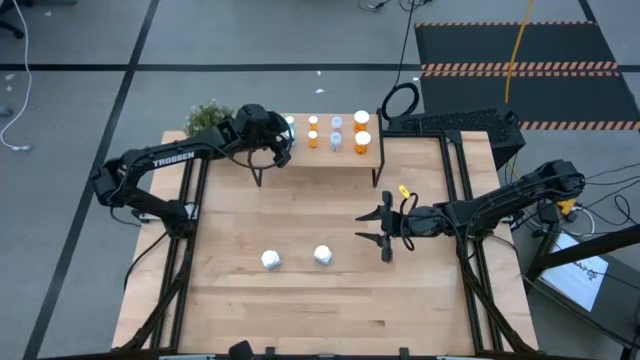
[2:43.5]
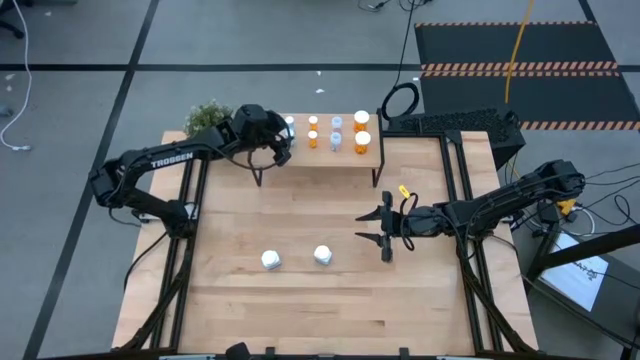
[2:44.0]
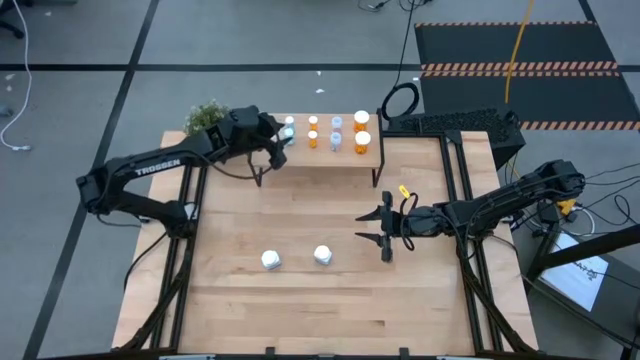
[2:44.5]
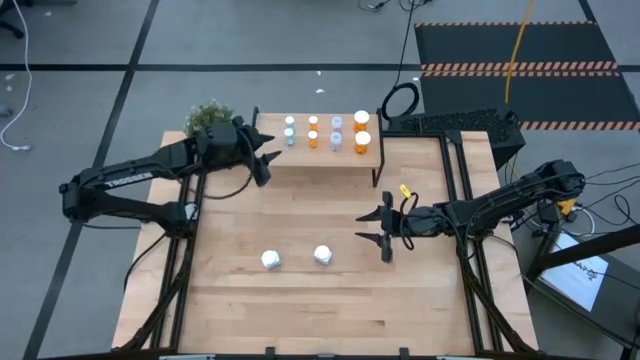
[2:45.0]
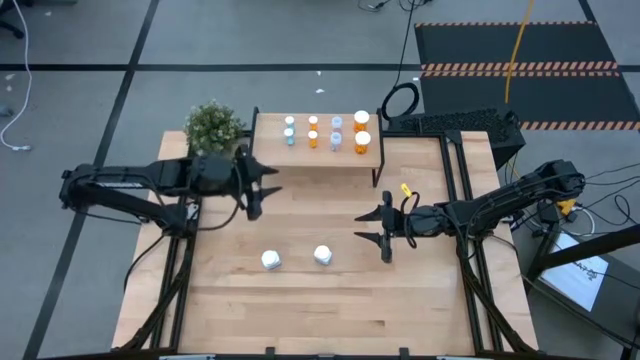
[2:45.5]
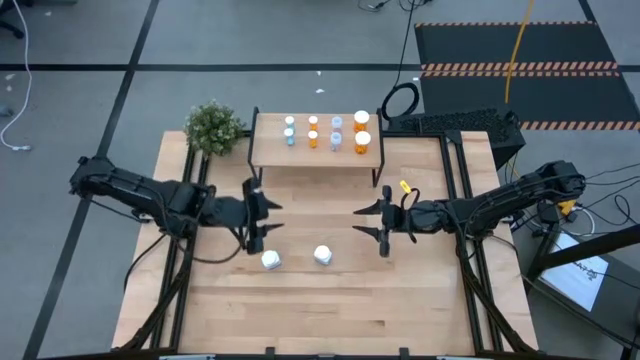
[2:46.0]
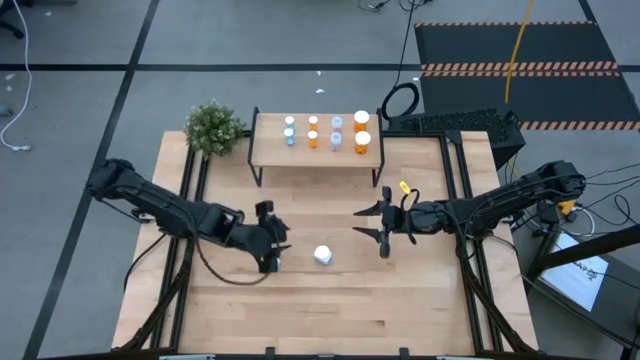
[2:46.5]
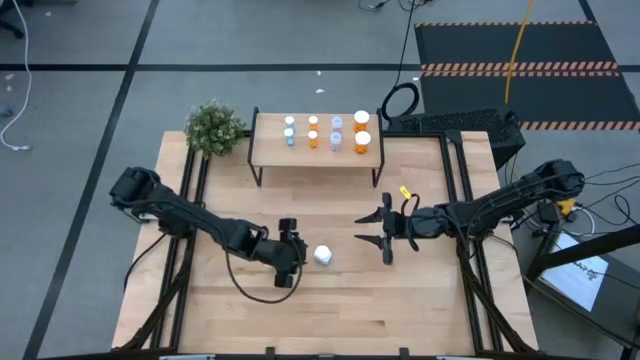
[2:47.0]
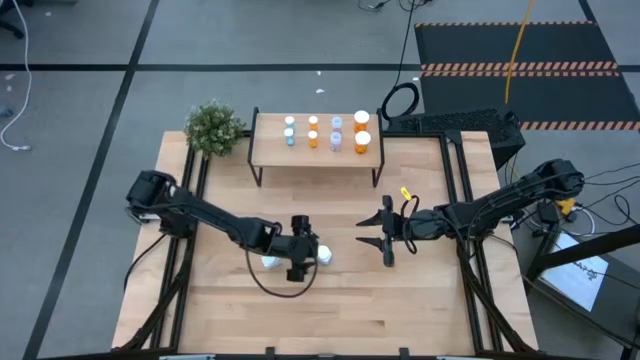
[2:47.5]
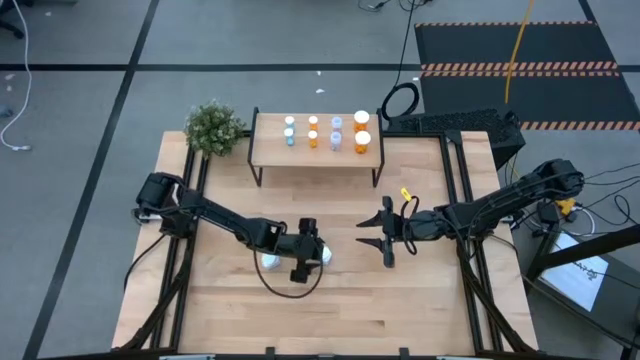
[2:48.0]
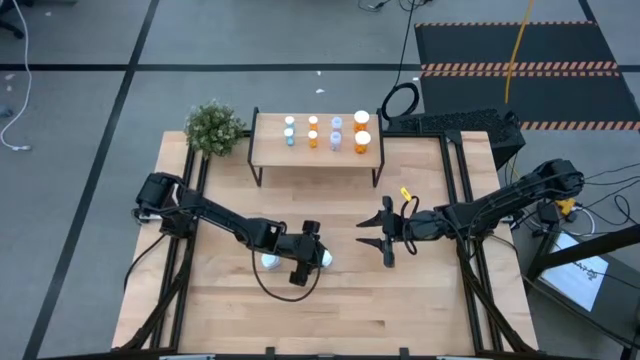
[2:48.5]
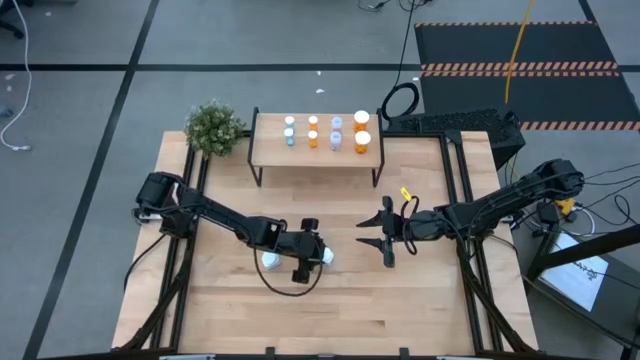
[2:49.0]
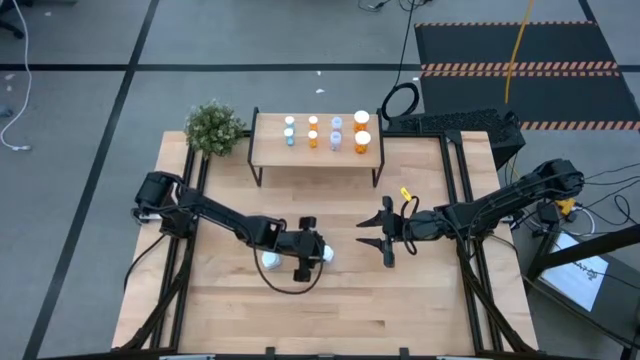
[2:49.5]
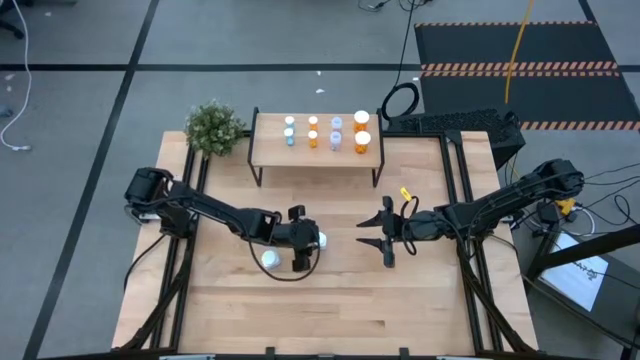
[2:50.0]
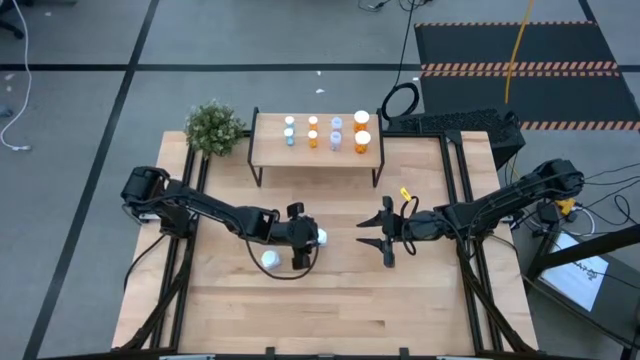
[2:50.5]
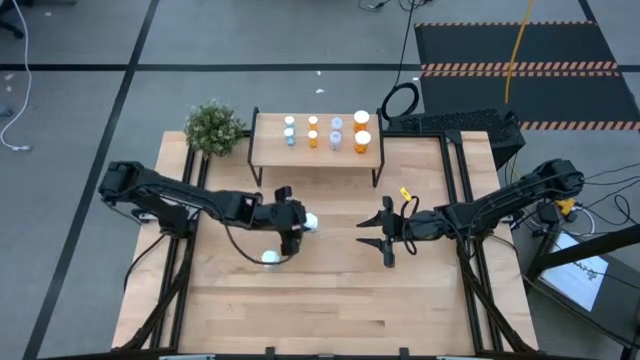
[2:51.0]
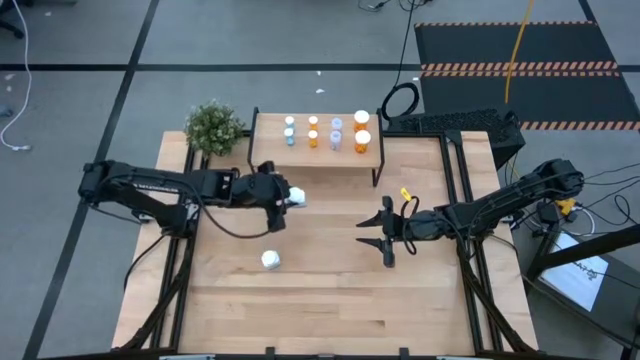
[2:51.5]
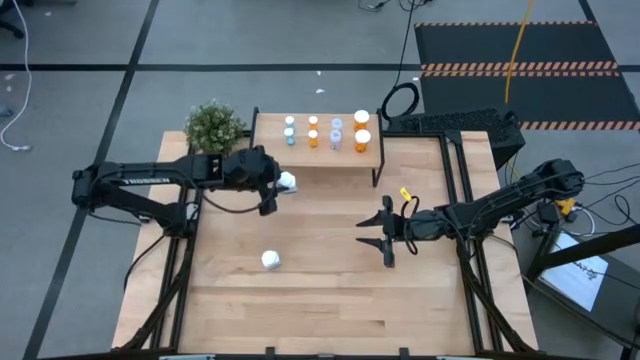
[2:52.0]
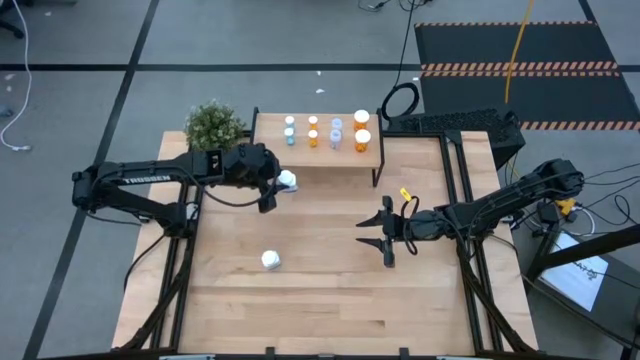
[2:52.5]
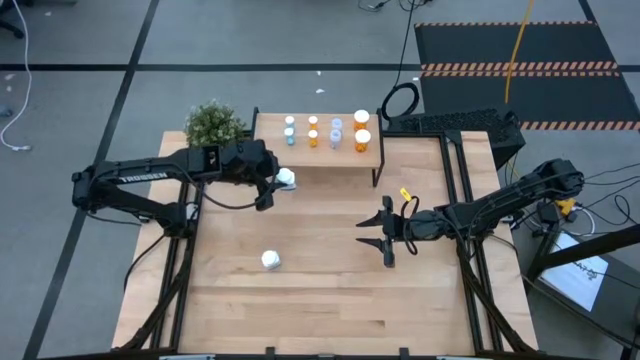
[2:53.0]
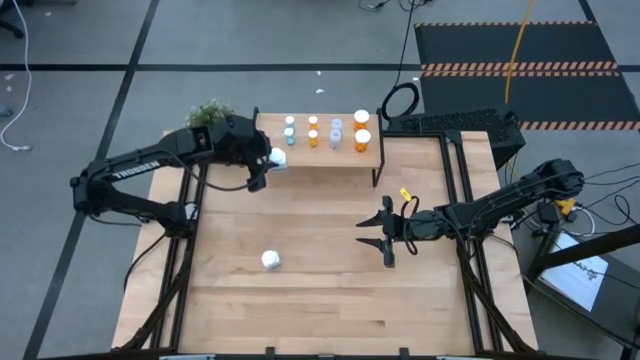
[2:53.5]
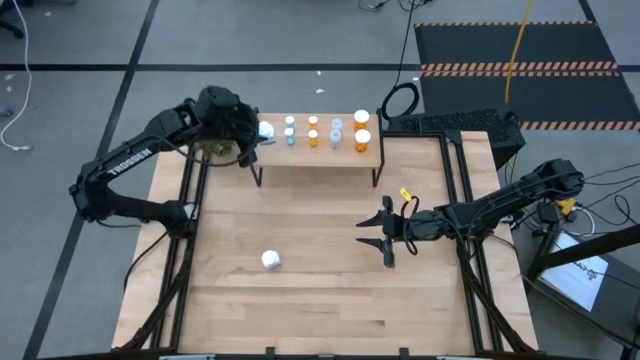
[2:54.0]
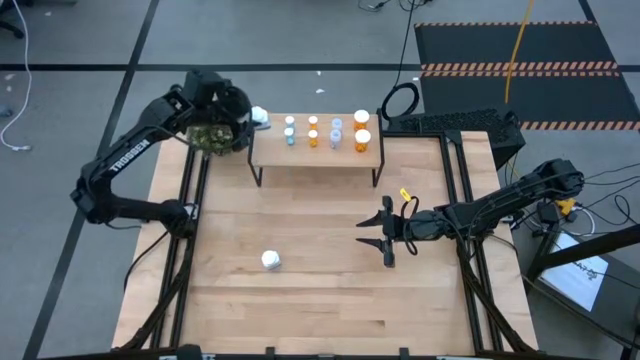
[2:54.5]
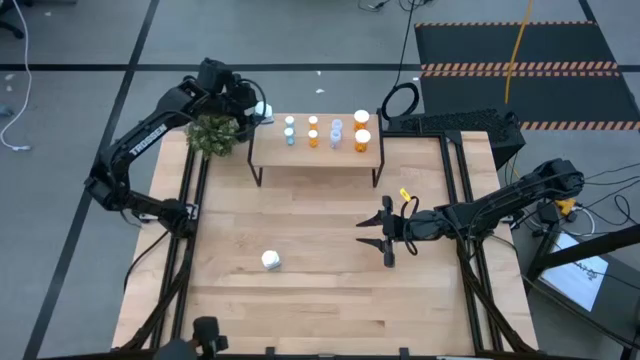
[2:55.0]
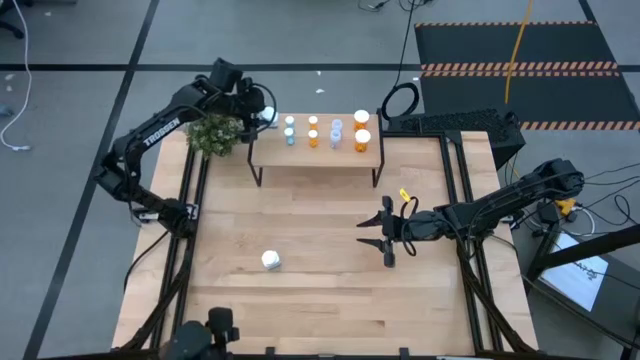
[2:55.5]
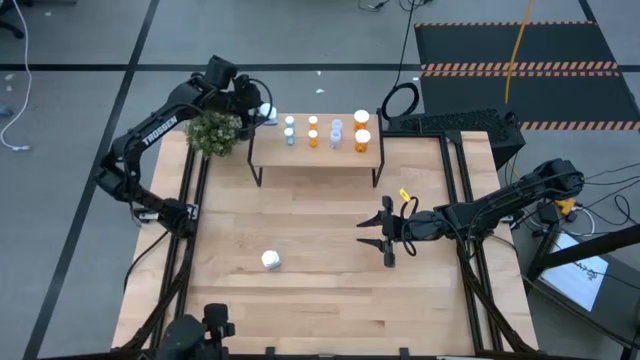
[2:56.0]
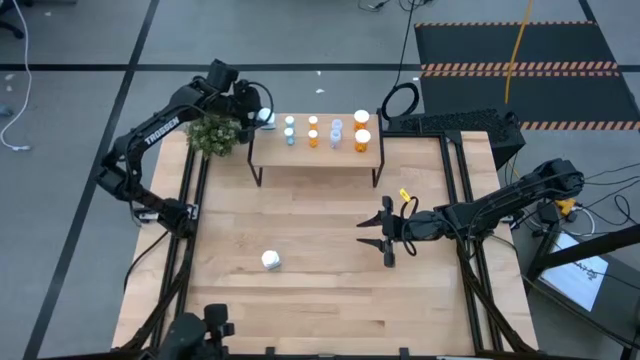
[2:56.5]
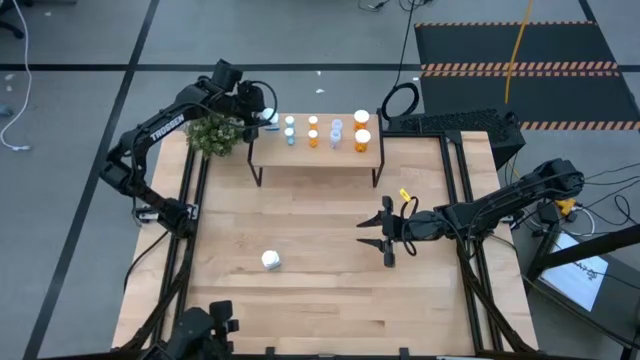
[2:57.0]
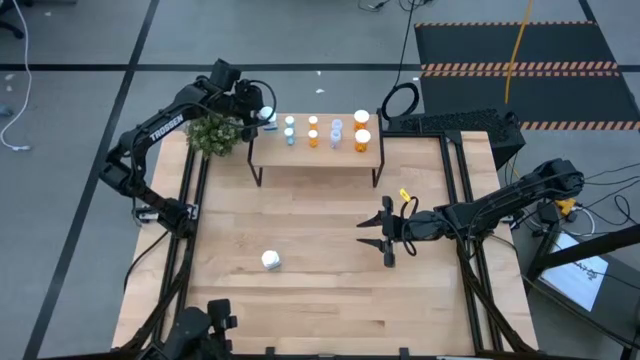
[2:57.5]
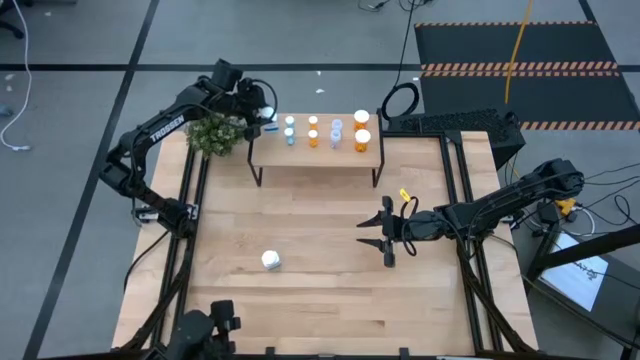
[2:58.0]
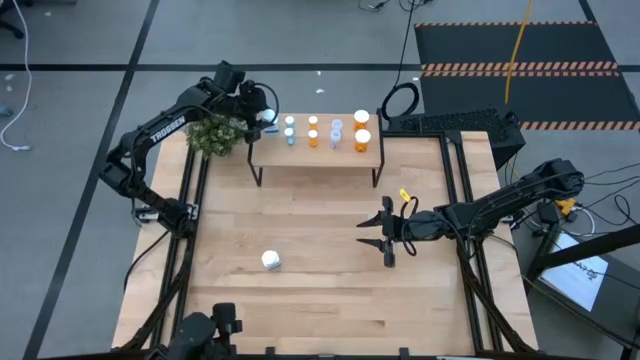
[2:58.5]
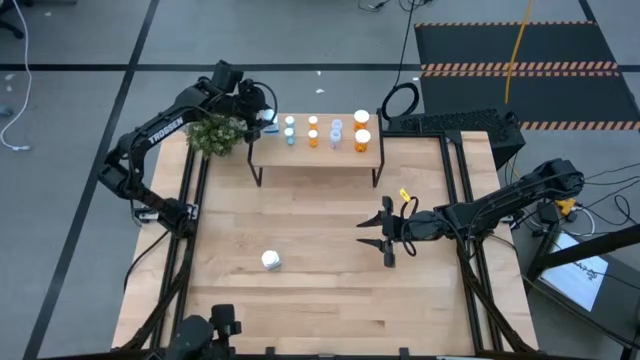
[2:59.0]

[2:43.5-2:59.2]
Task: Pick and place medicine bottles onto shelf by color
Put the right white medicine bottle on the shelf

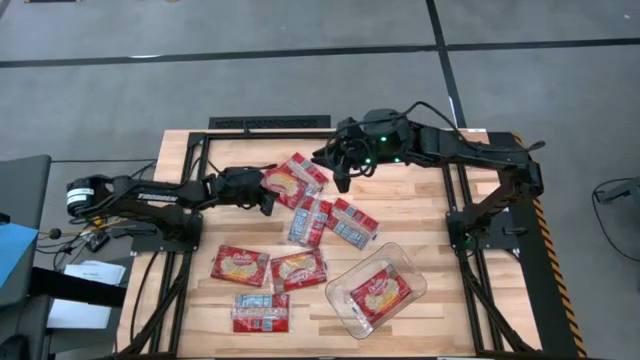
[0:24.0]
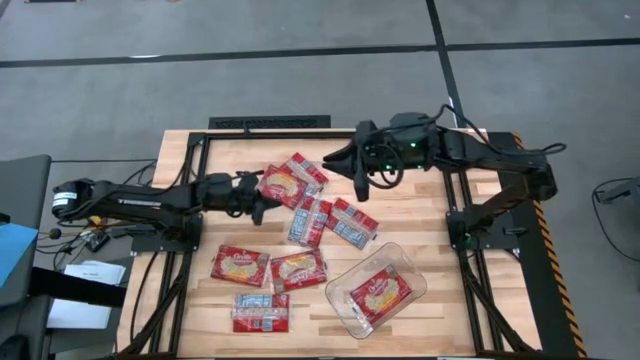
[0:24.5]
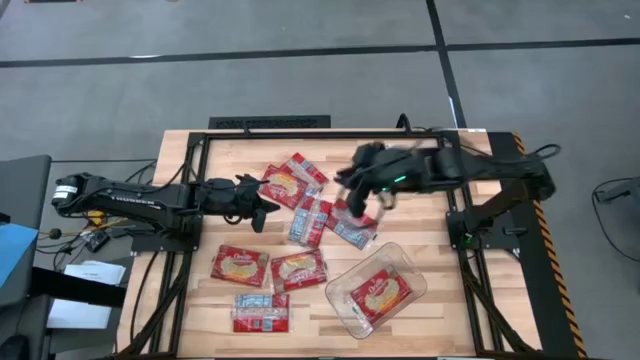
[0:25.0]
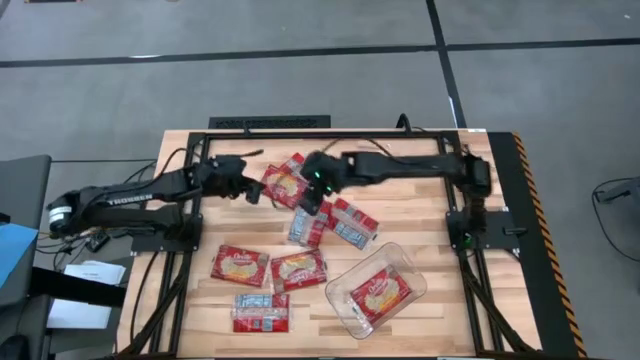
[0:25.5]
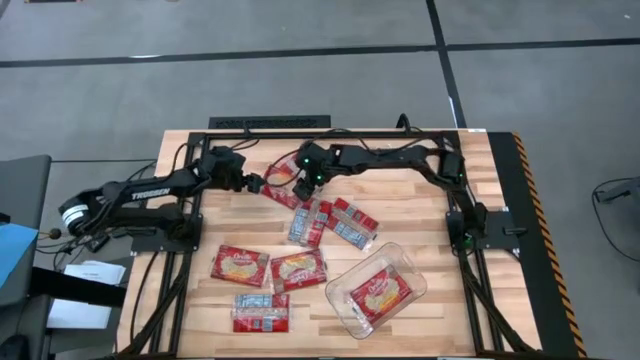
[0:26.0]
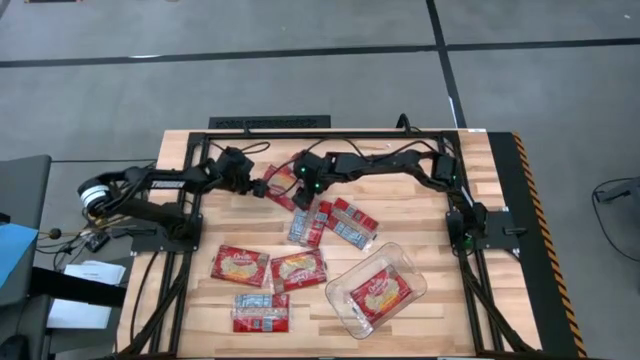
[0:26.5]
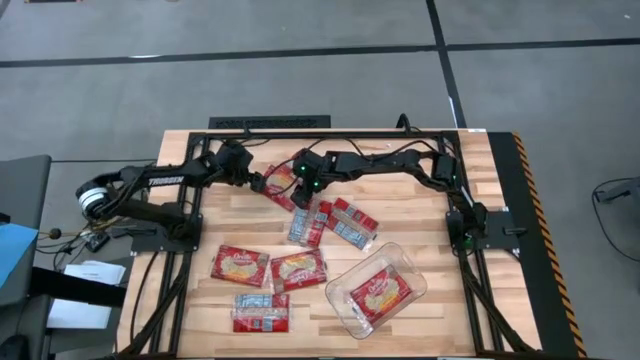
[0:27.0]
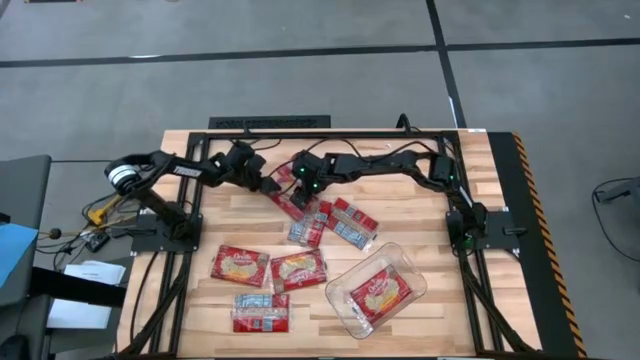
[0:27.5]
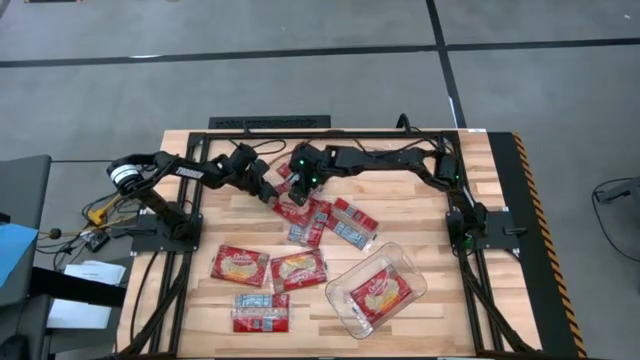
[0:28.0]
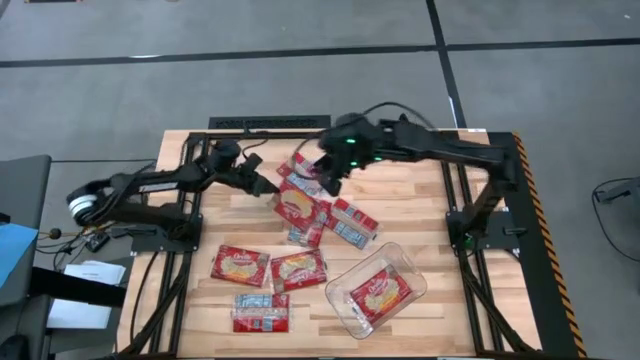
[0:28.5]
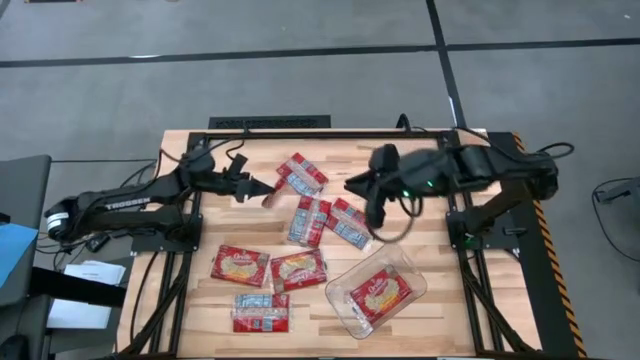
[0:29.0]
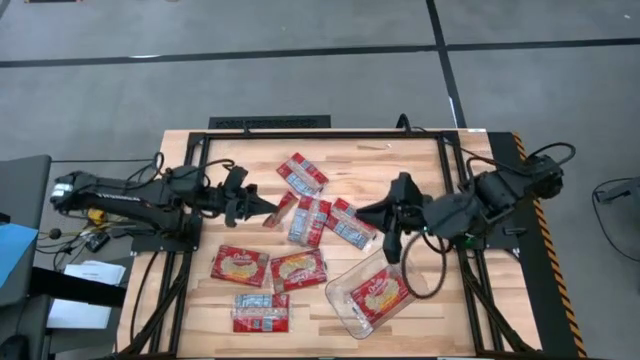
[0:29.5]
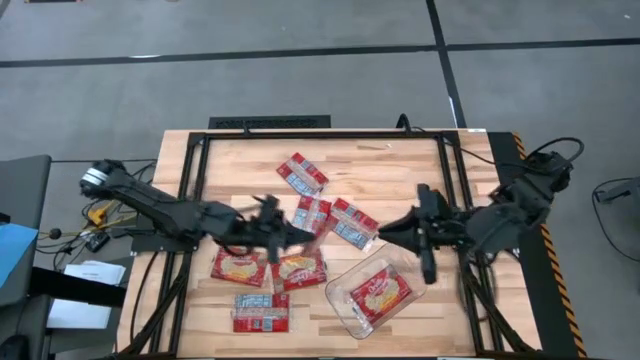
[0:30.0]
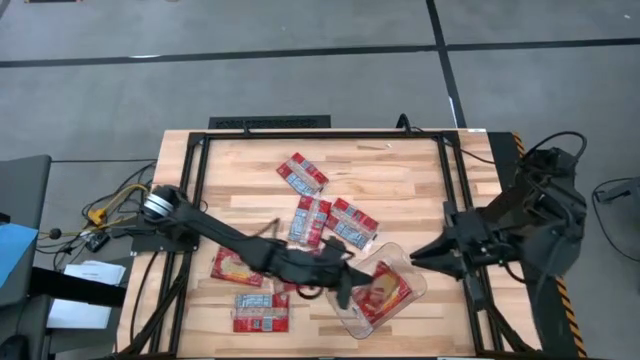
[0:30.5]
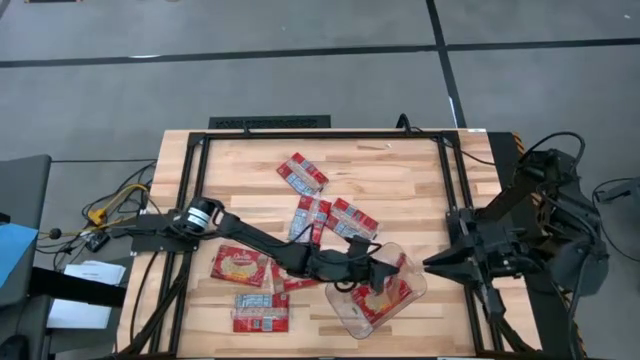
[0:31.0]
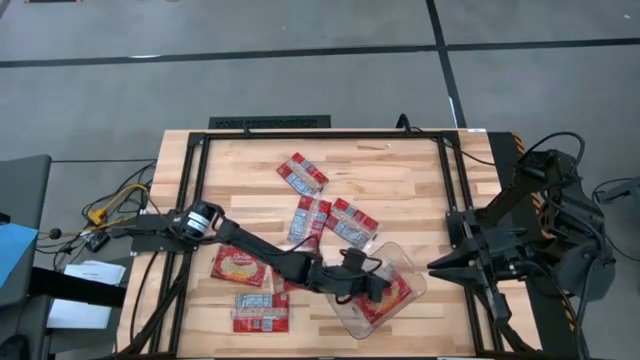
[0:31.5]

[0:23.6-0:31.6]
Task: Sort popcorn bags into baskets
Put the red popcorn bag into the transparent bin
